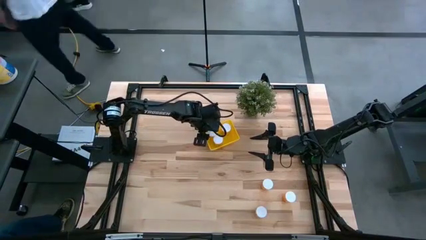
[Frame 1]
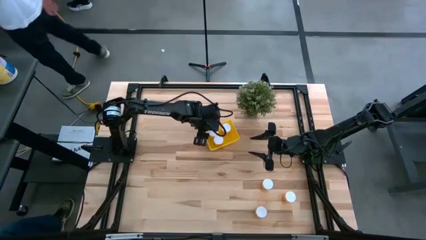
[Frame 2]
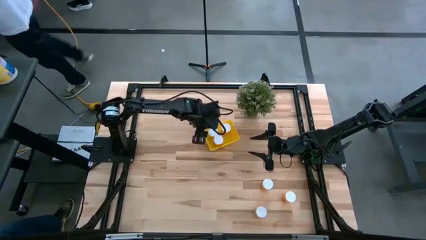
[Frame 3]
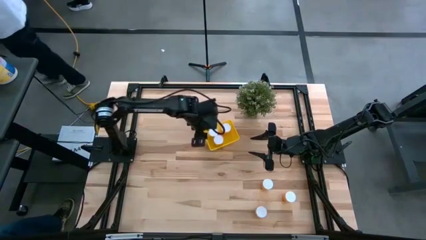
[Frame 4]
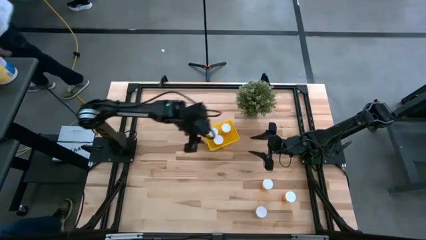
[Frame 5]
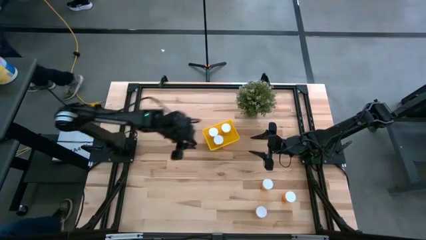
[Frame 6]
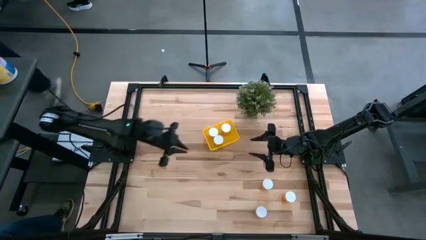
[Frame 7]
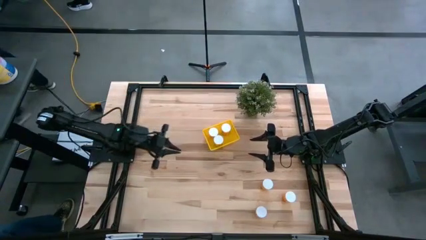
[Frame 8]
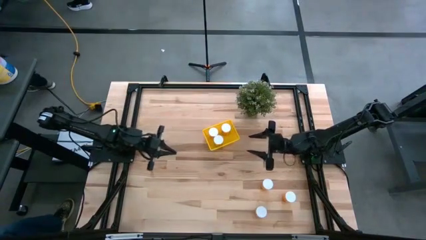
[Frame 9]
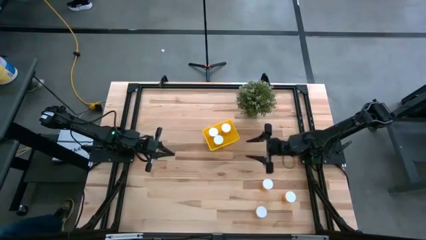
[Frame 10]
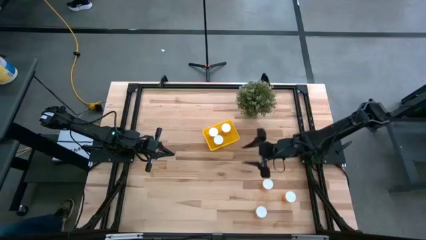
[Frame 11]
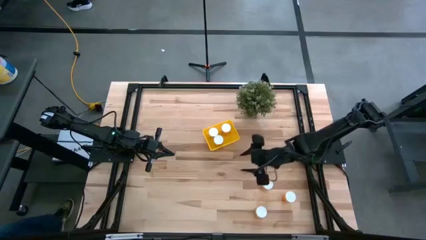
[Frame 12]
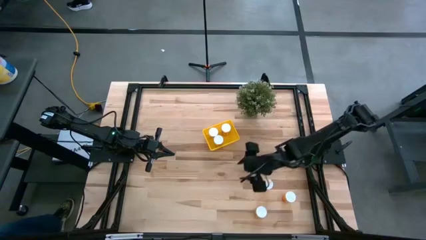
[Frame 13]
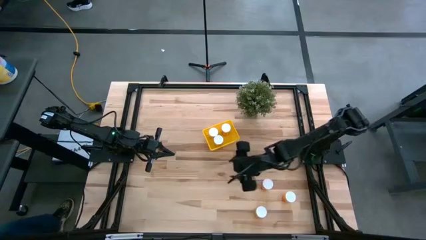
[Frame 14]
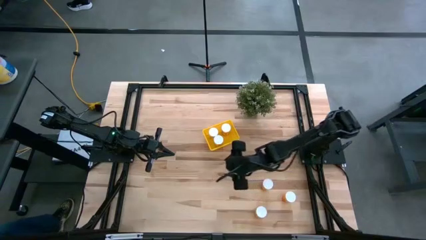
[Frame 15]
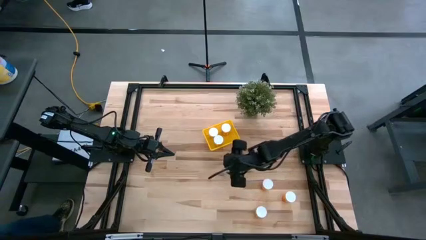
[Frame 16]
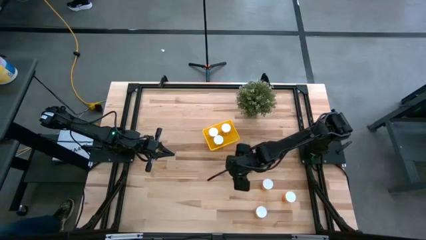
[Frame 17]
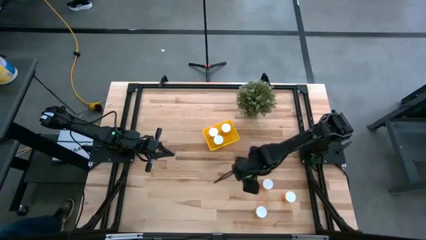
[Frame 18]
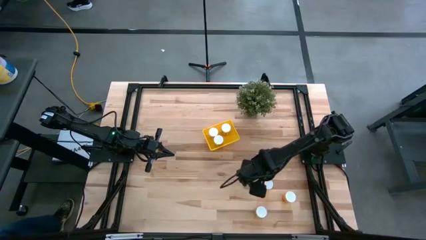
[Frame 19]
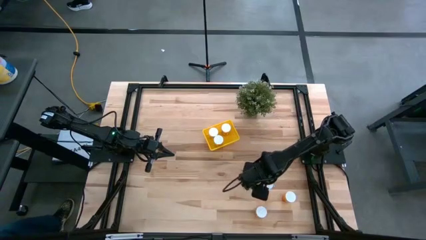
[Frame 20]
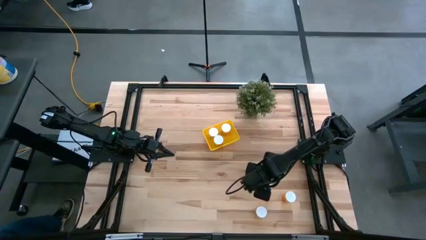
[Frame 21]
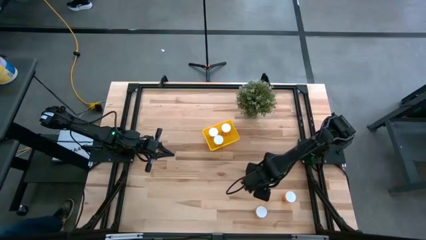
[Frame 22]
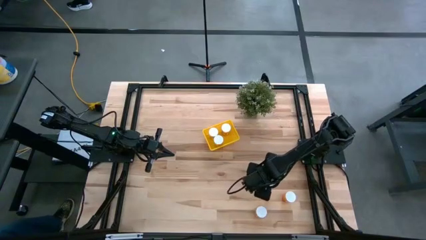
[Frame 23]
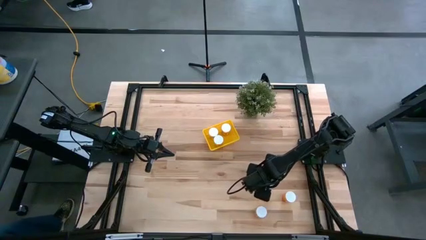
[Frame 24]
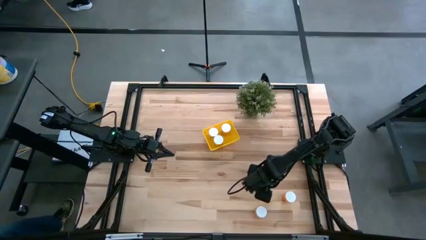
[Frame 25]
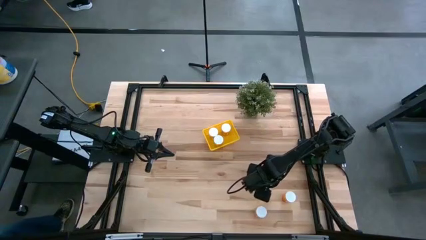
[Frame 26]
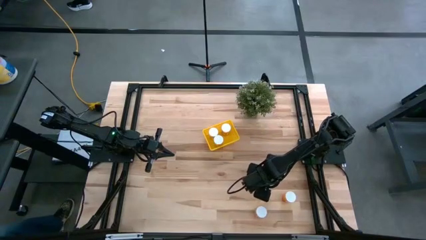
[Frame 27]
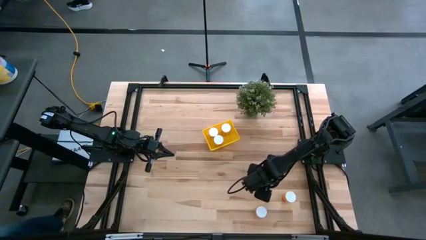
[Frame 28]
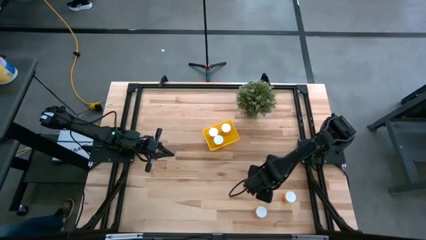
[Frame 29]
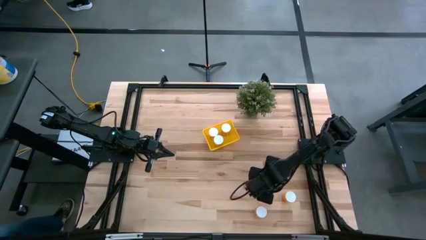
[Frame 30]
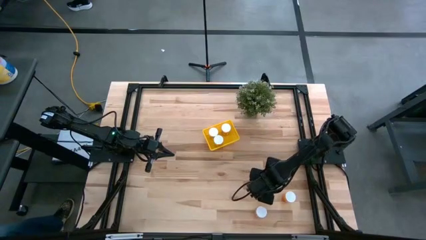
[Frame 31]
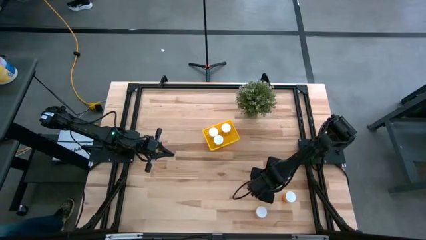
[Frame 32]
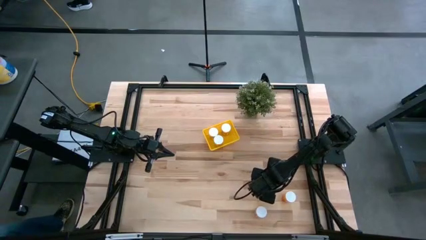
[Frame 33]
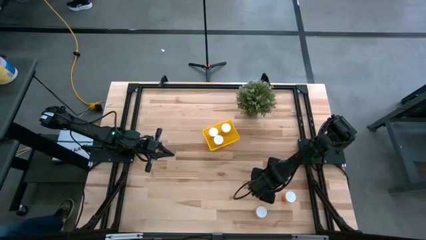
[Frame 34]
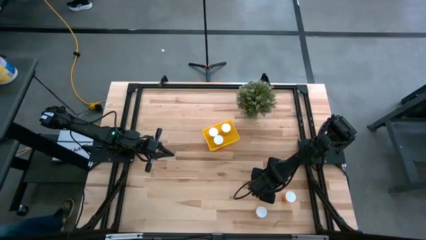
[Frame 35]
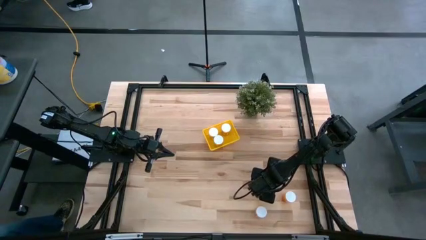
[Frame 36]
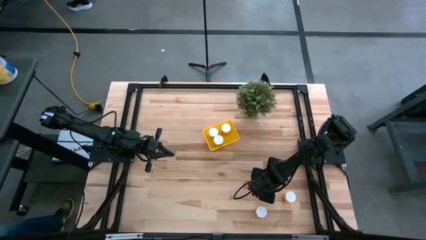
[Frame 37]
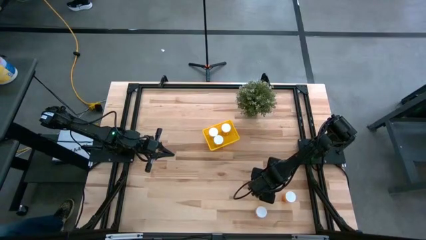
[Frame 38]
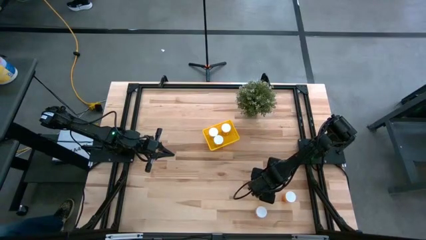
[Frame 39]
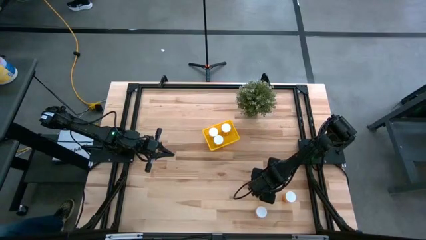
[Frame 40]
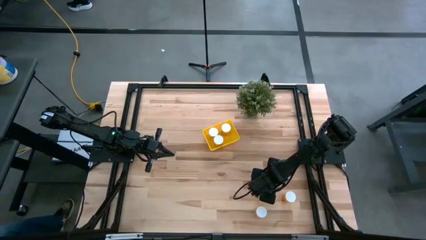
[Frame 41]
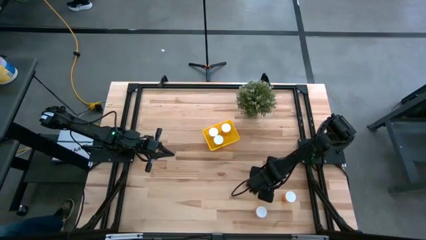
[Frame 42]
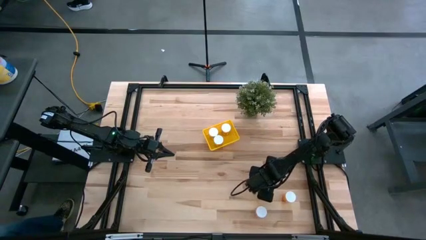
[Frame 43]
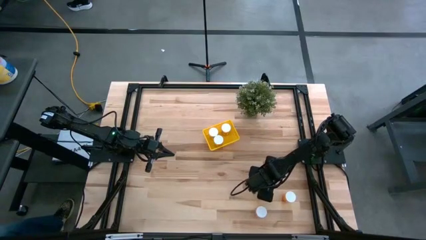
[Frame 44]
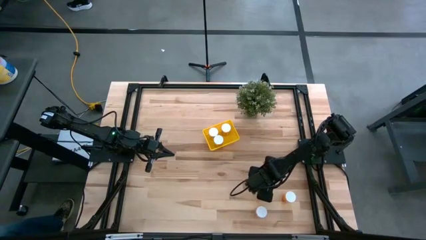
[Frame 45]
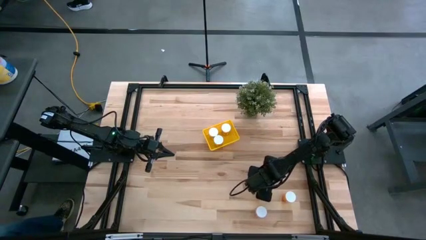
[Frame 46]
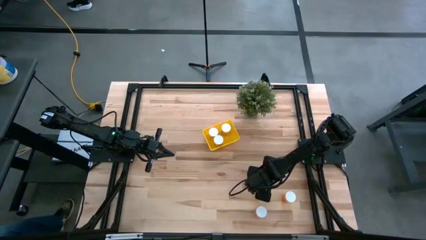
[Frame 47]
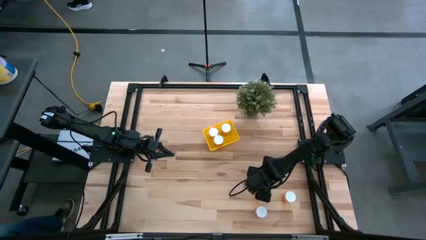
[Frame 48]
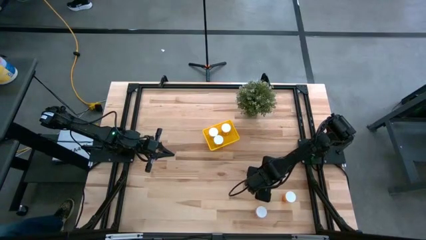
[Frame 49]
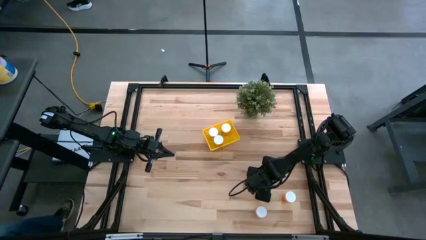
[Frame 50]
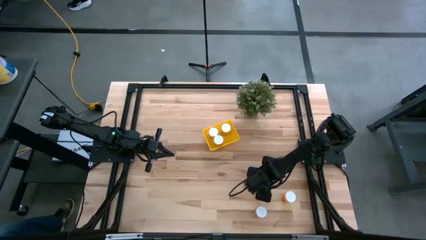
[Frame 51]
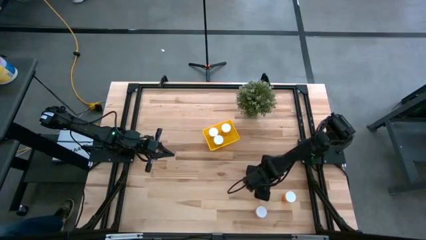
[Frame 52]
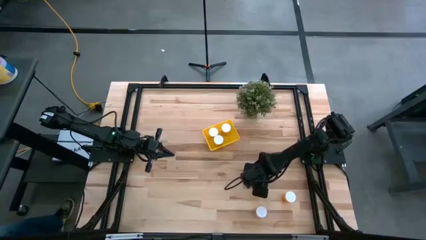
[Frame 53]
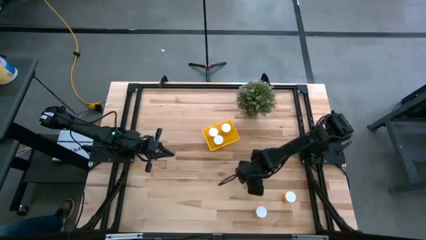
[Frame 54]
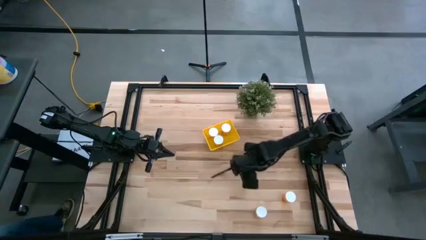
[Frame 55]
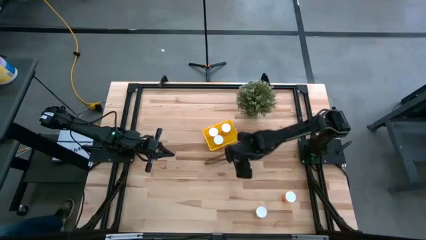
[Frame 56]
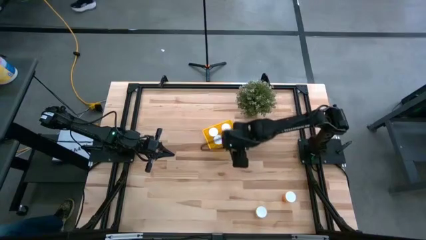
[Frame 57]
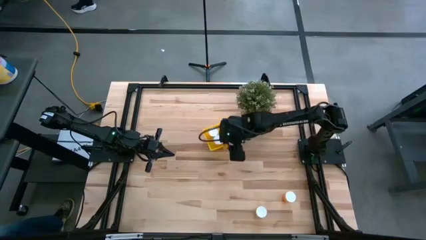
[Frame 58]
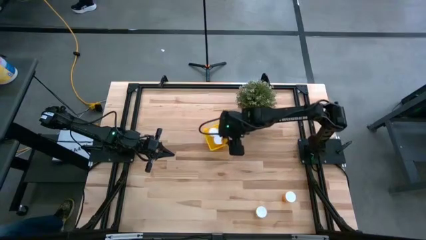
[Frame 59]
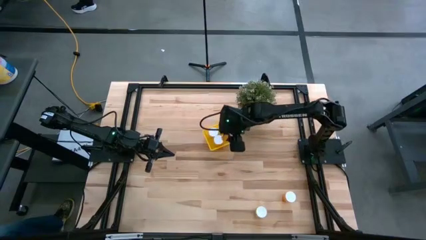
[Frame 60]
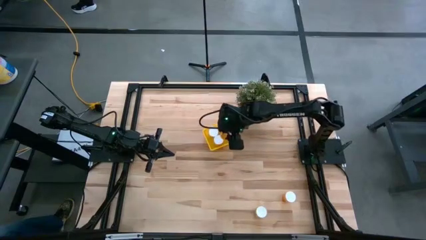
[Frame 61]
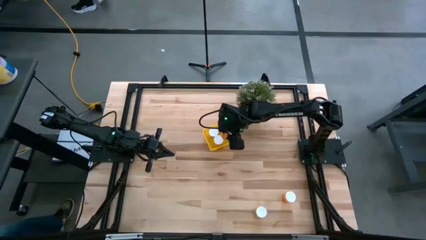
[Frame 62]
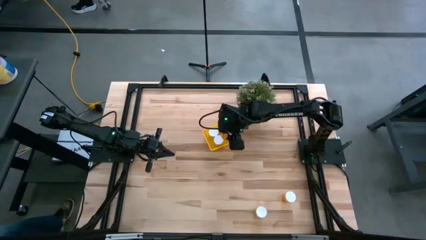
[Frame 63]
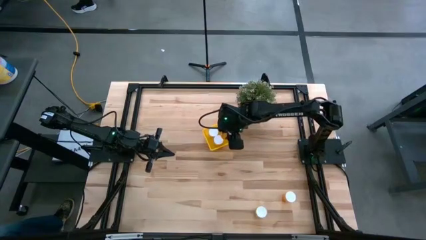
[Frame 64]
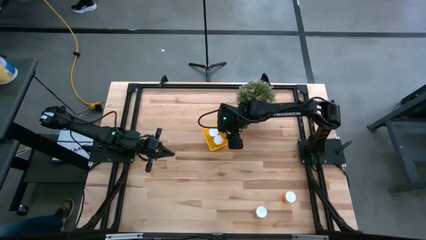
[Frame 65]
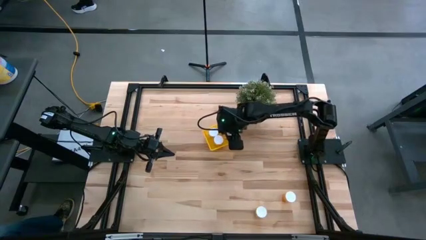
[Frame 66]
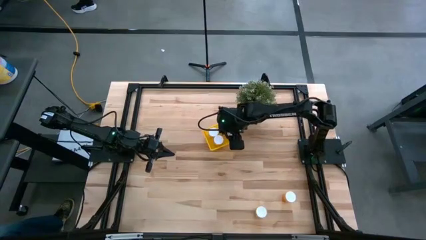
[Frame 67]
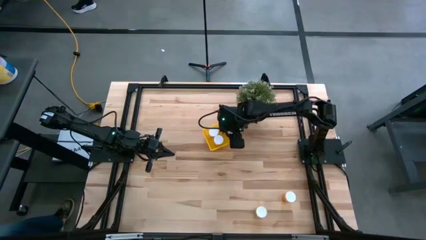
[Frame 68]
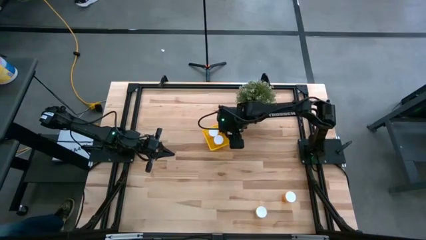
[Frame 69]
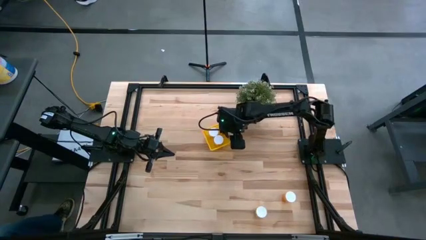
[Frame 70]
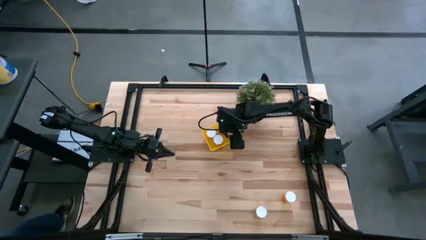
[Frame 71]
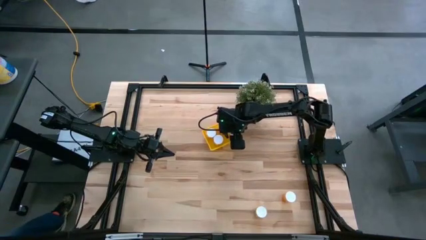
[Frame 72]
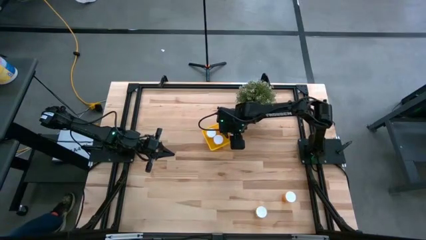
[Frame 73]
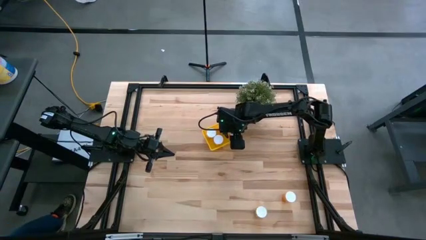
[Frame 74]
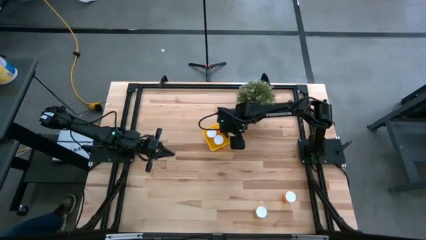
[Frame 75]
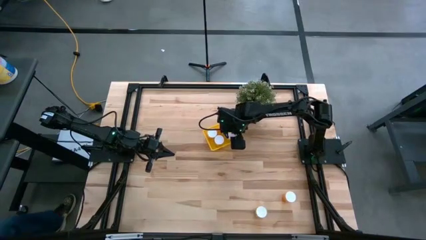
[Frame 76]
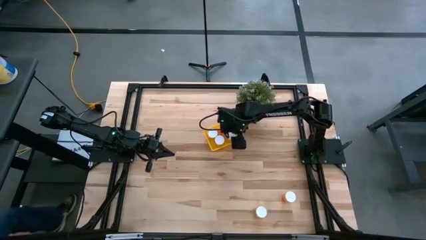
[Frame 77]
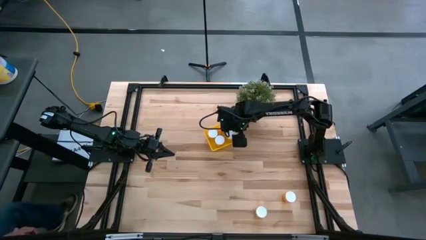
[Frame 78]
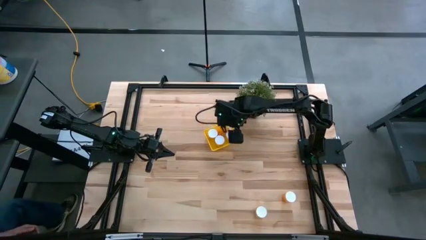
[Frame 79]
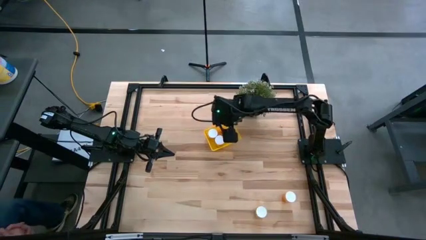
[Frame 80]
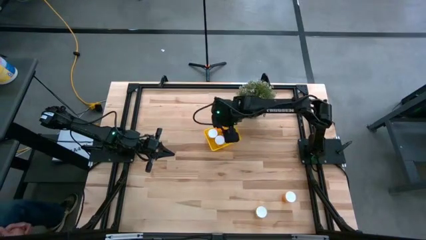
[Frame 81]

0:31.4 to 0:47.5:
Task: Pick and place pill bottles into a basket
Put the orange pill bottle into the yellow bin
